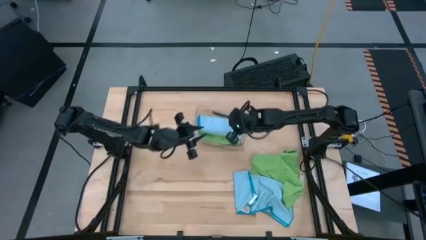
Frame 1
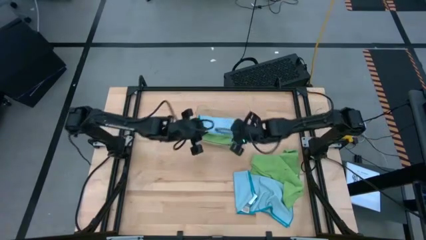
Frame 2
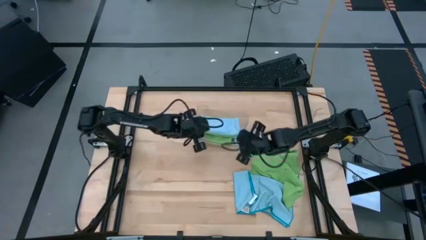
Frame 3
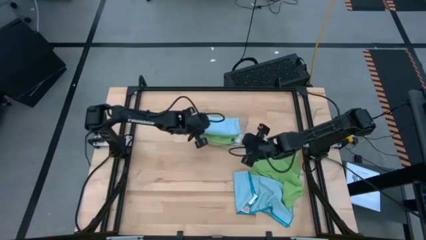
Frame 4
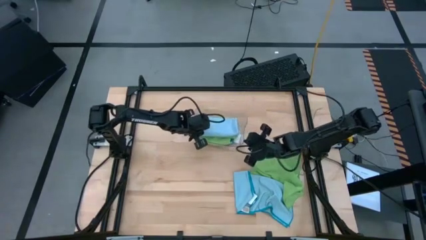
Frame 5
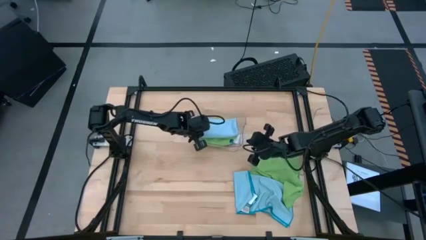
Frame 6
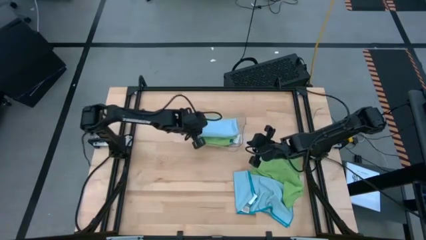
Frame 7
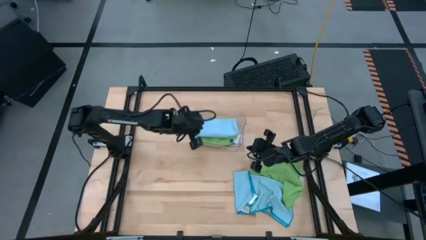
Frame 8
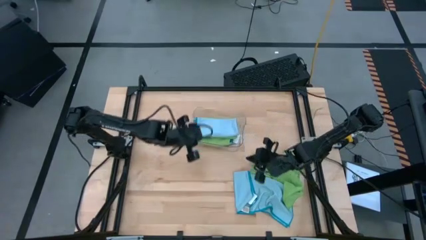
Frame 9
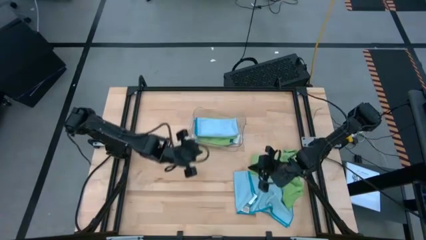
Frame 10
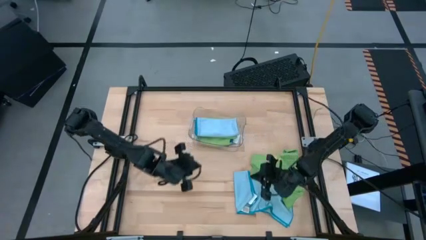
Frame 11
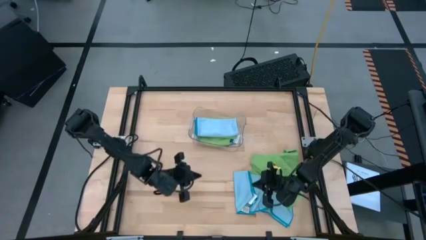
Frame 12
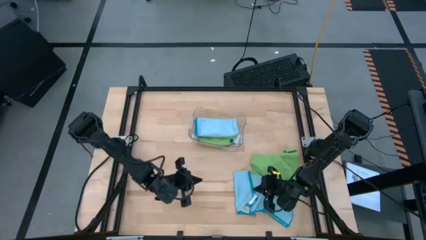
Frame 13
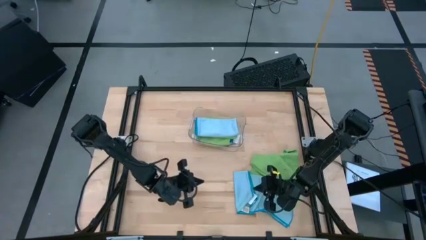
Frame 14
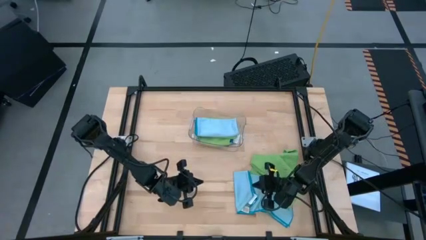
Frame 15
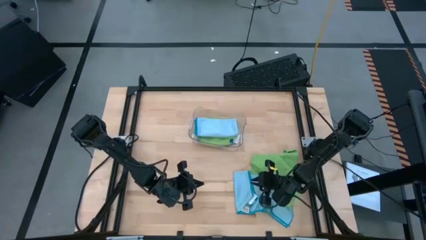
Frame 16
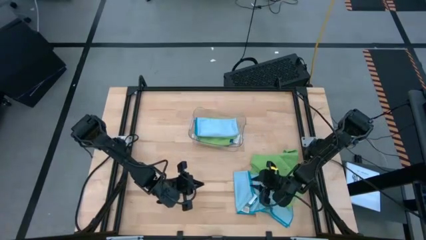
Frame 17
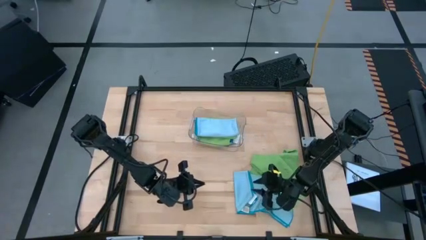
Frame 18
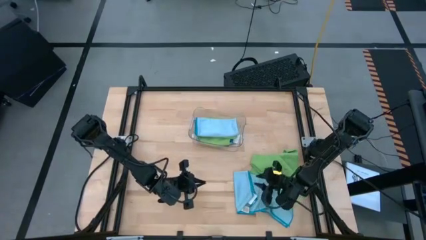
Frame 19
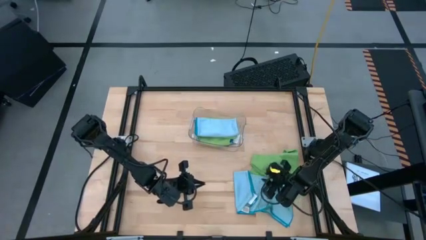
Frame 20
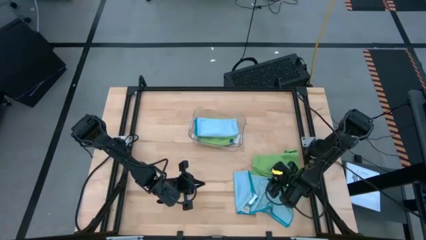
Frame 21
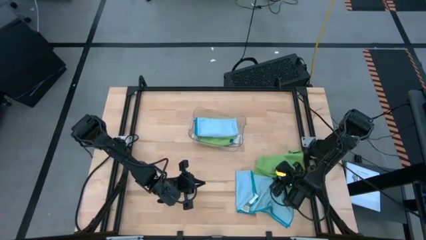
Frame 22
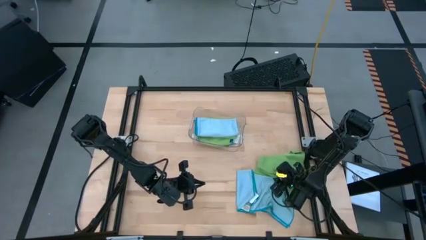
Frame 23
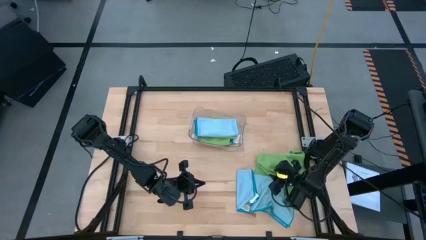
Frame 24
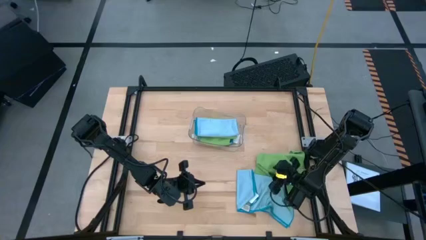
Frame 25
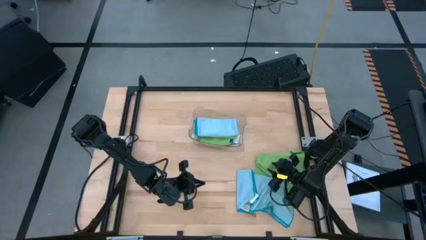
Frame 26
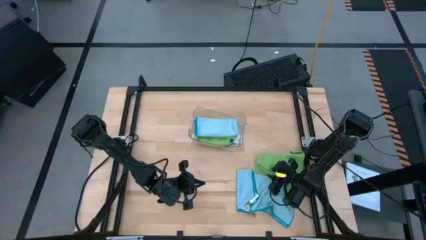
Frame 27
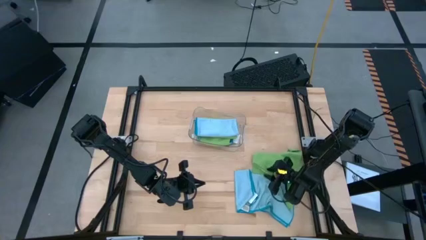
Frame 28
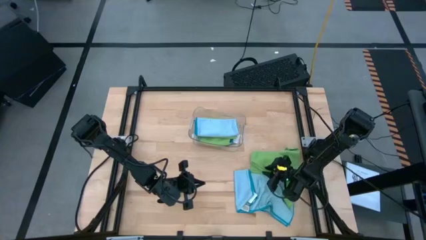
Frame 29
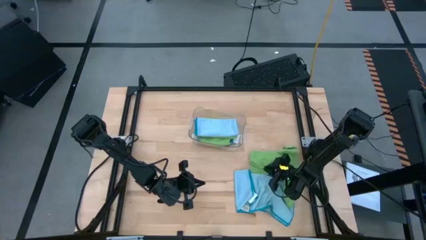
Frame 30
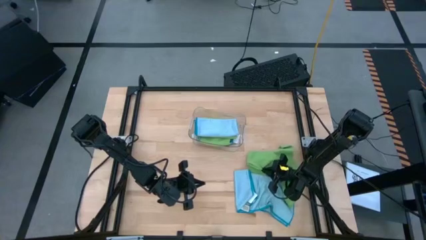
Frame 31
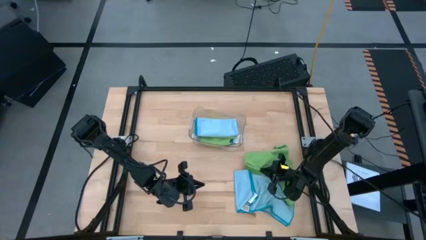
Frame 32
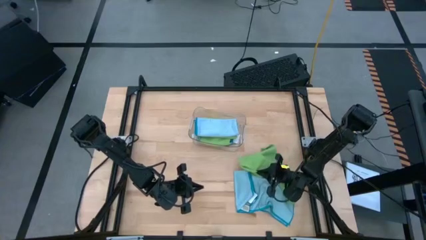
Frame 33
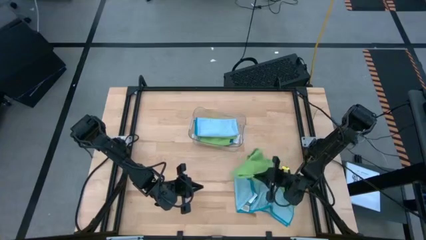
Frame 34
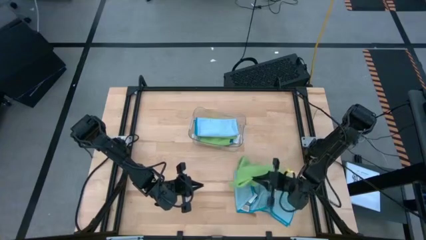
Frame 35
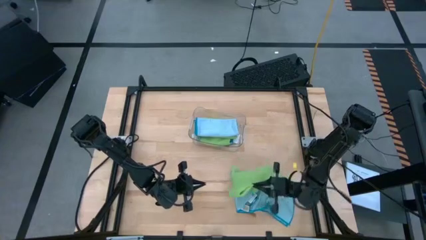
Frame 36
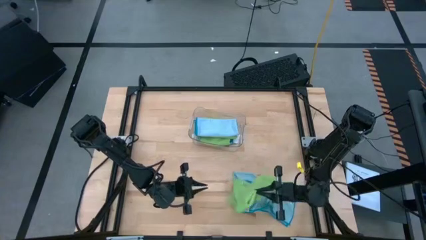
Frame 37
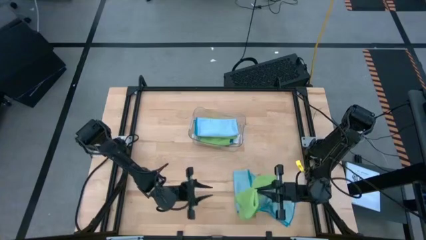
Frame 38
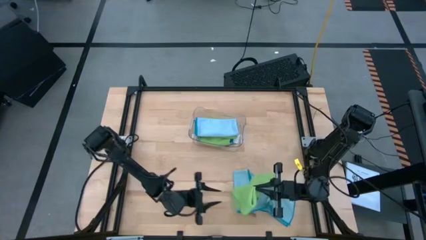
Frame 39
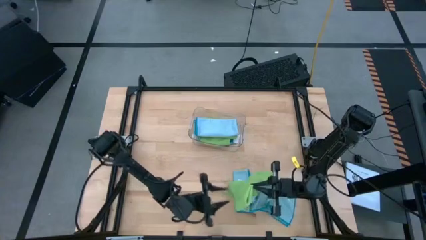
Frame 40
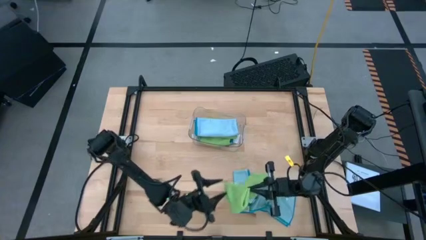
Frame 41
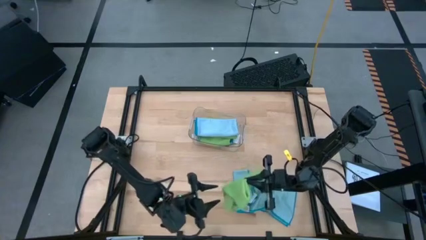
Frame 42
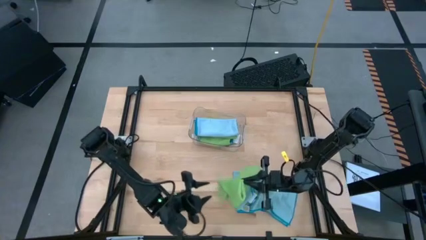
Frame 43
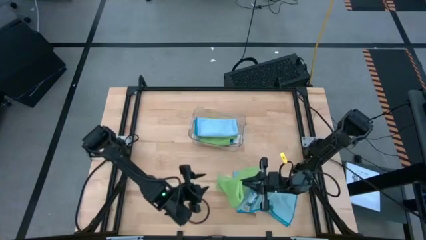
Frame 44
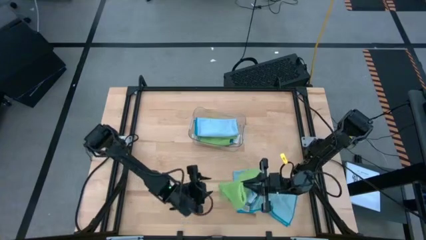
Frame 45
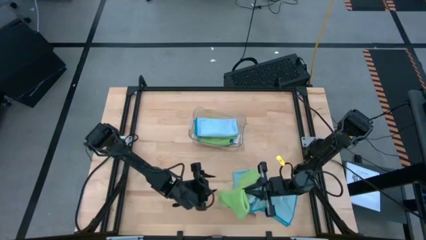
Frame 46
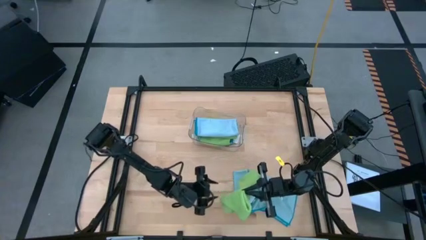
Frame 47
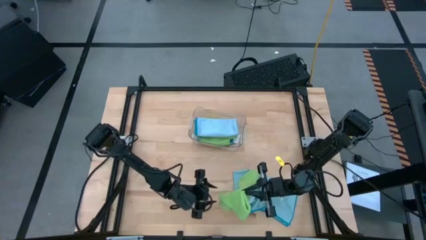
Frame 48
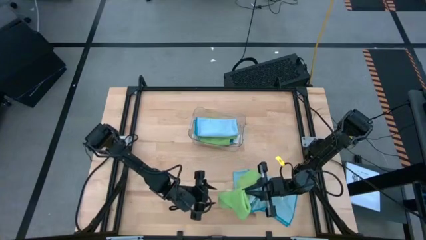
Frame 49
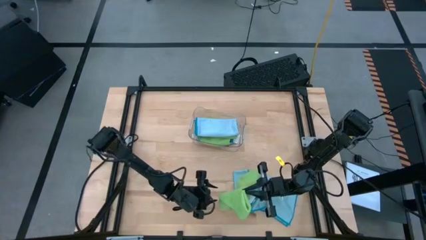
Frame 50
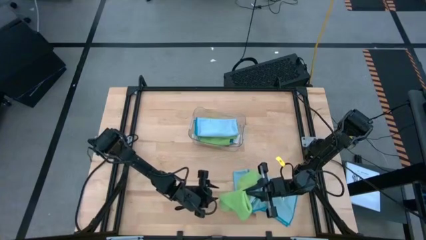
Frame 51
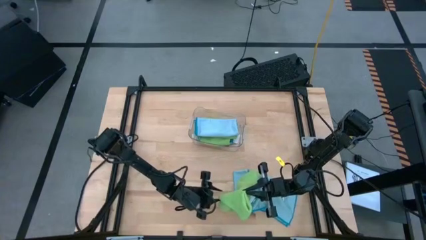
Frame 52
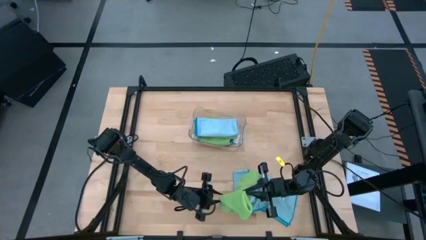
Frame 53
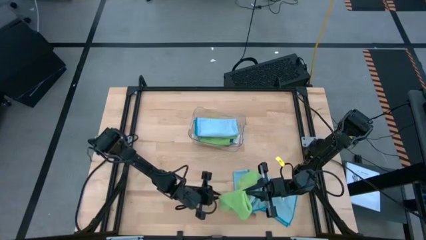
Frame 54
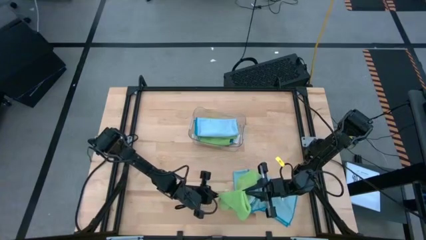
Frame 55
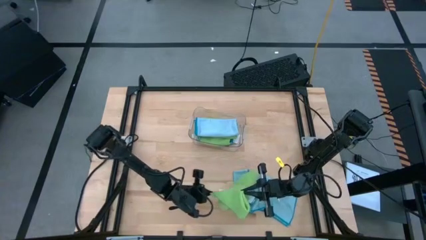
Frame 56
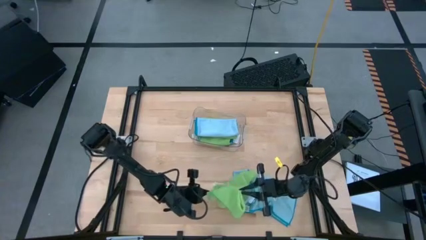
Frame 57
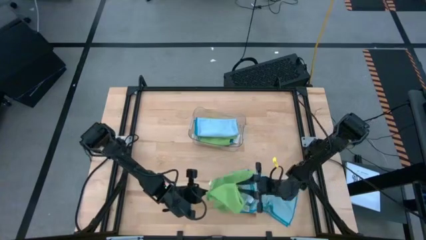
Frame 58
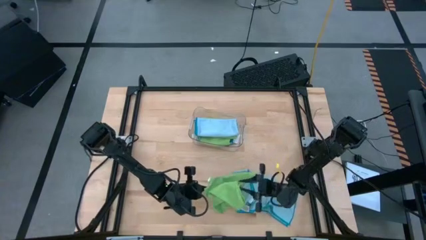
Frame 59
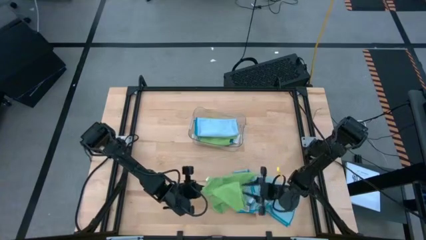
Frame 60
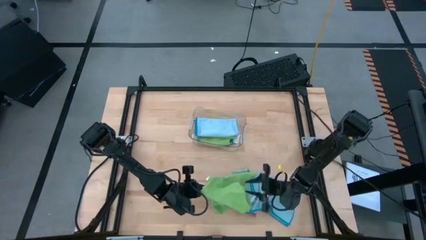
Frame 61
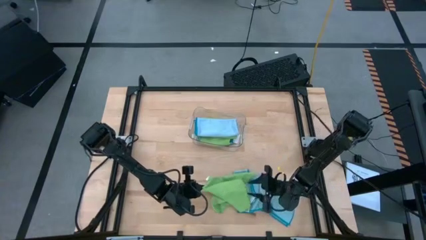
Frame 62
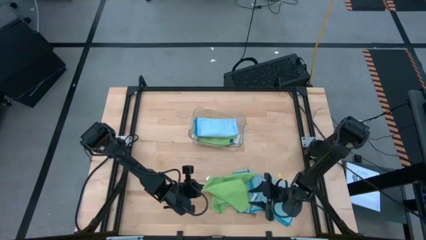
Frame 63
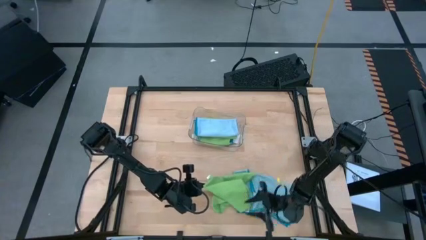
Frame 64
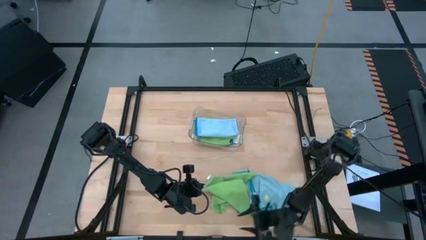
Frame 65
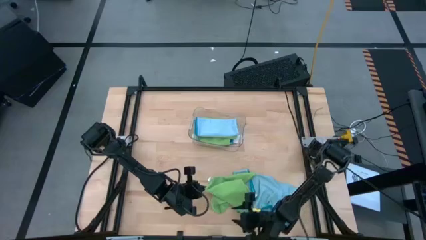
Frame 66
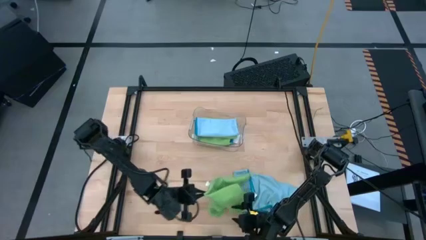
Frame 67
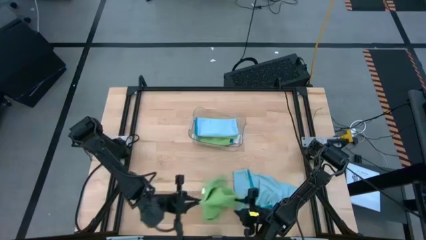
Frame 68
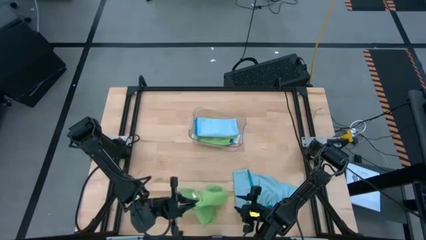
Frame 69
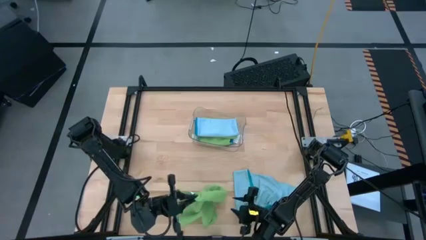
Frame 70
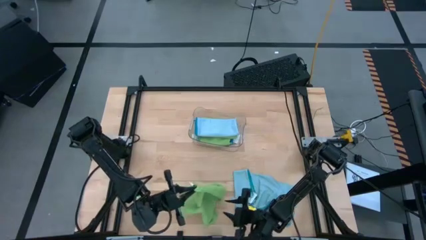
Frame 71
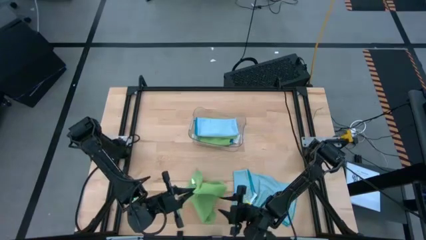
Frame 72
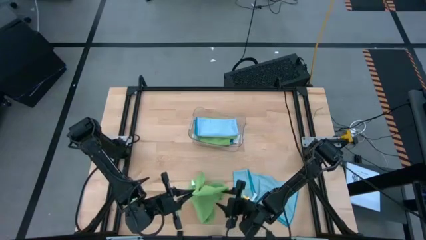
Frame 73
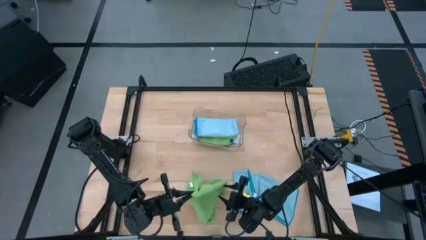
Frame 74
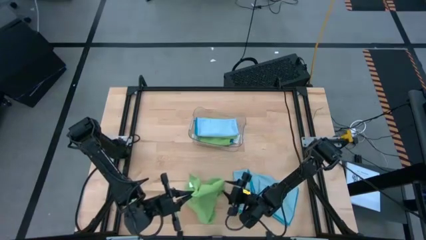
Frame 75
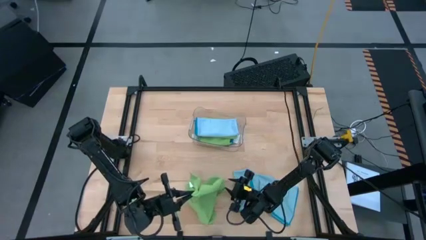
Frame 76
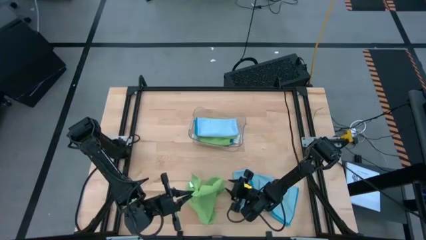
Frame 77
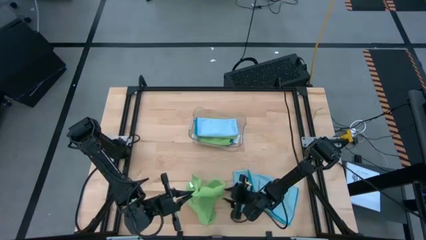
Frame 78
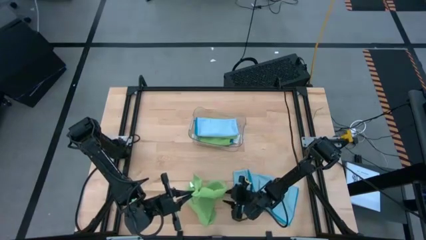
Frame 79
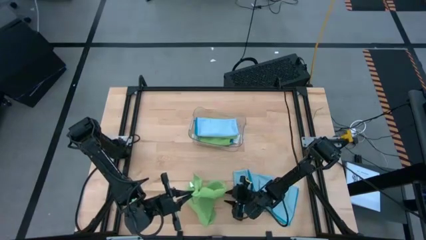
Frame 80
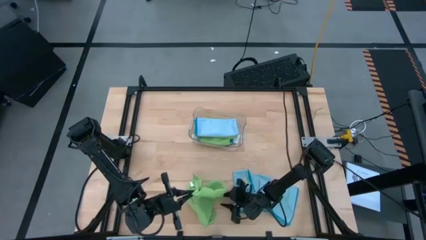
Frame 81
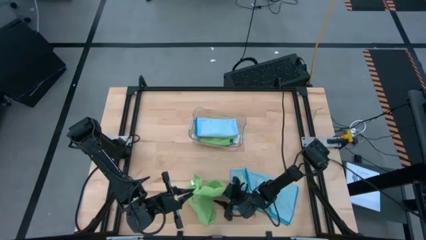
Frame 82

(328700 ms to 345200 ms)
Task: Fold microfiber towels
Fold the green microfiber cloth

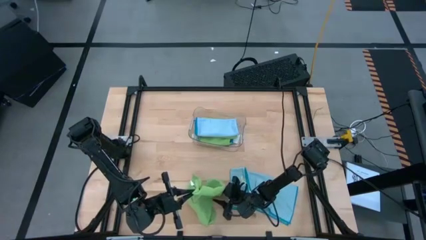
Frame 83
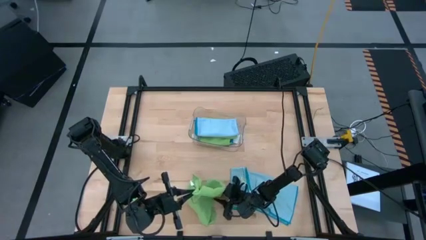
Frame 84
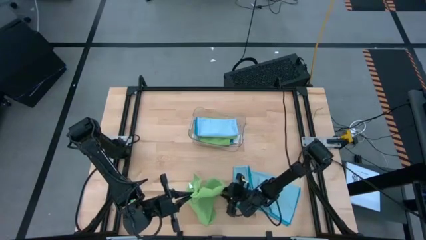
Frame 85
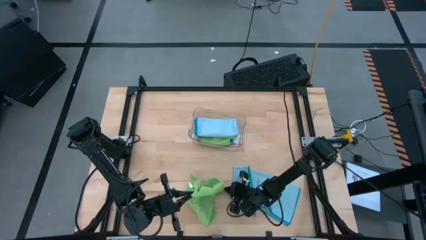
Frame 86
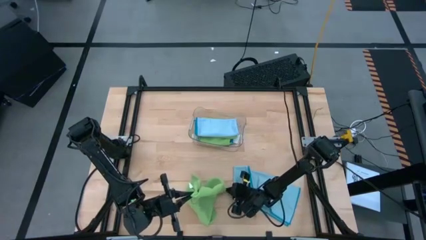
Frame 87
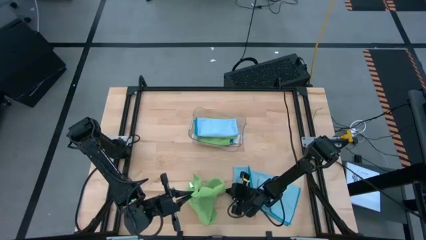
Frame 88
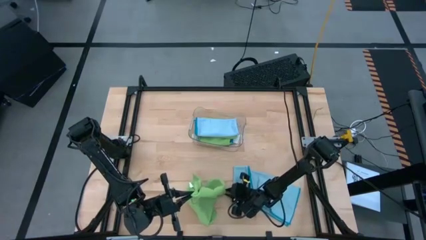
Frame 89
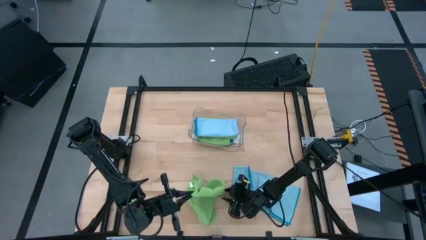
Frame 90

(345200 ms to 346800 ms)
Fold the green microfiber cloth
